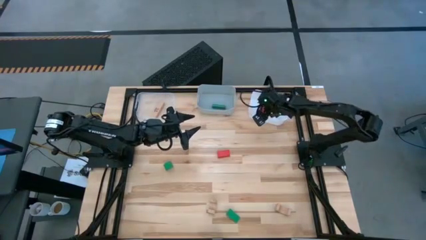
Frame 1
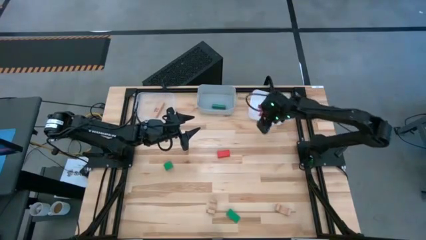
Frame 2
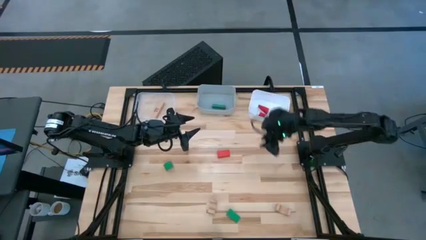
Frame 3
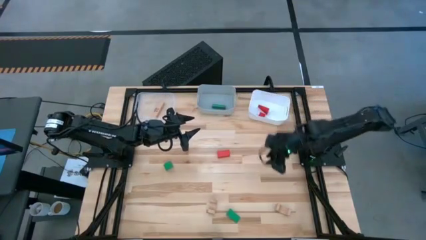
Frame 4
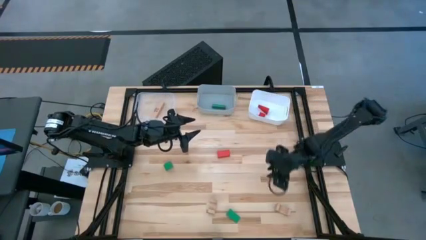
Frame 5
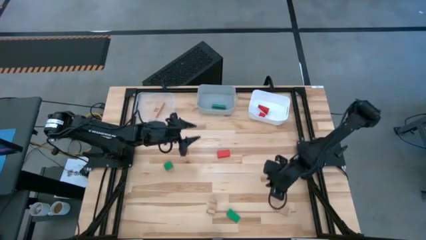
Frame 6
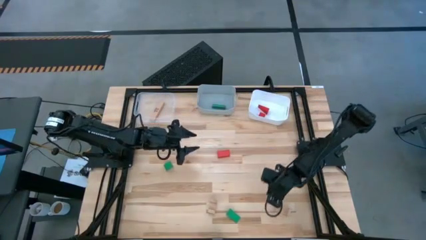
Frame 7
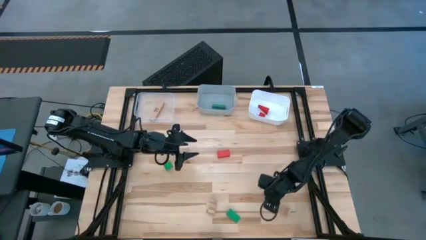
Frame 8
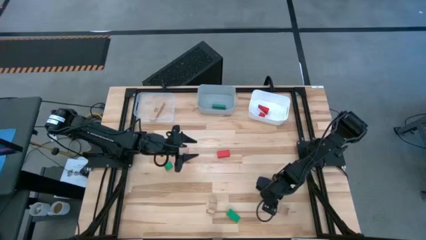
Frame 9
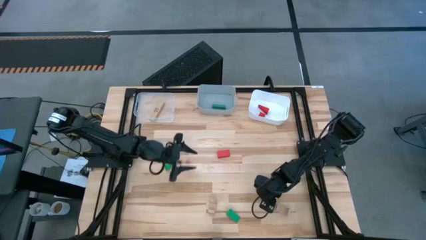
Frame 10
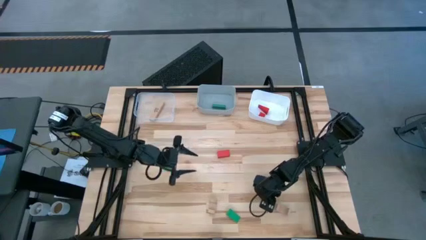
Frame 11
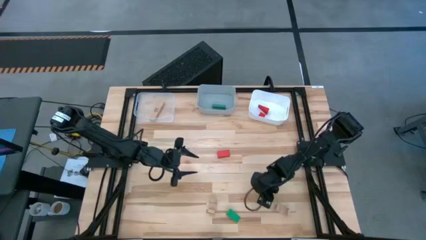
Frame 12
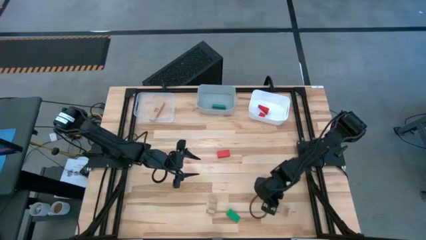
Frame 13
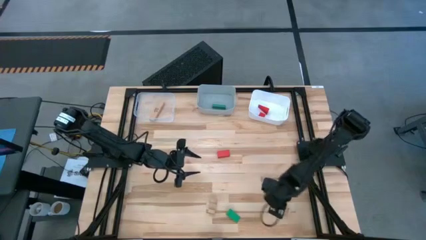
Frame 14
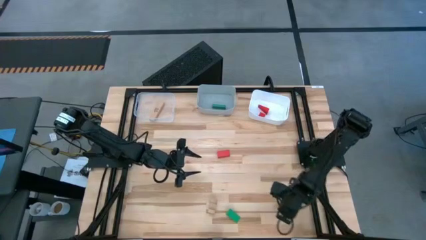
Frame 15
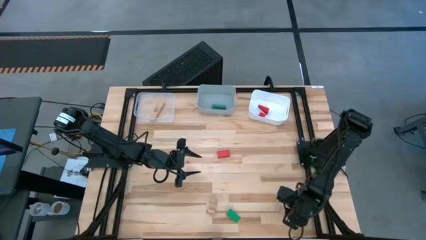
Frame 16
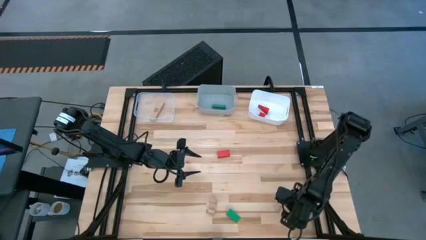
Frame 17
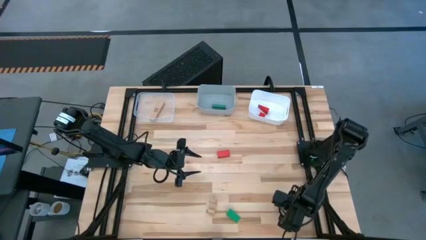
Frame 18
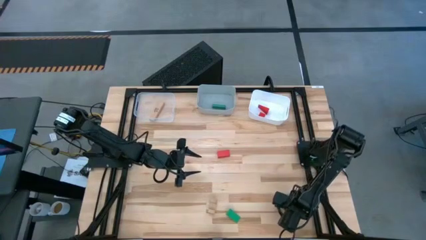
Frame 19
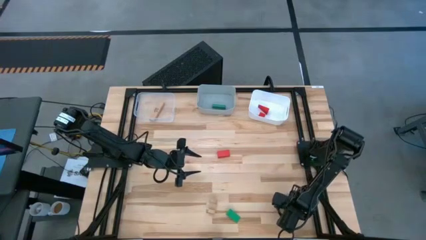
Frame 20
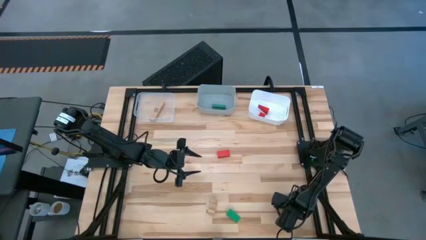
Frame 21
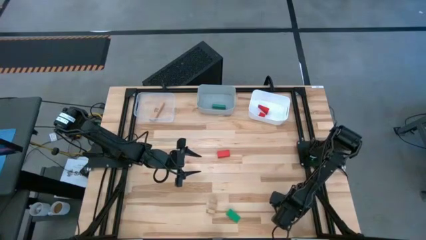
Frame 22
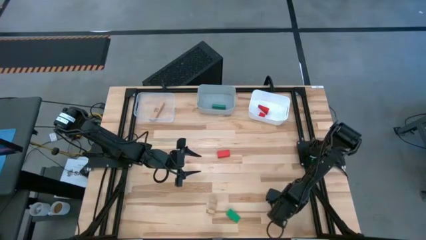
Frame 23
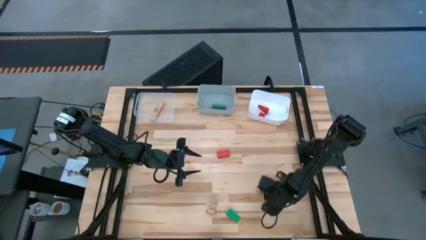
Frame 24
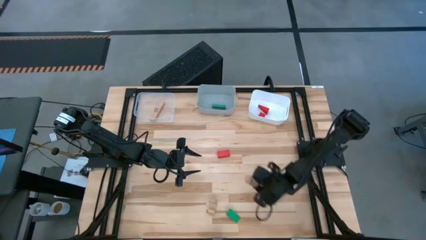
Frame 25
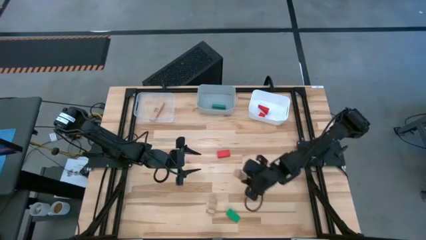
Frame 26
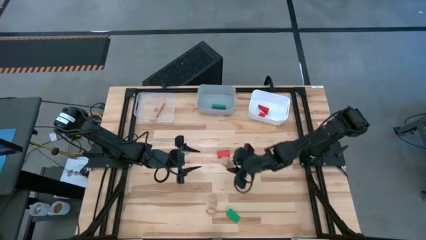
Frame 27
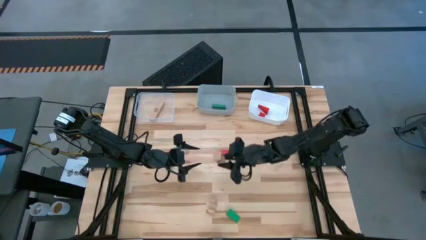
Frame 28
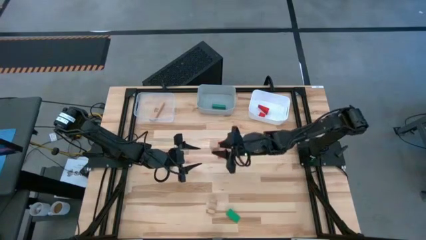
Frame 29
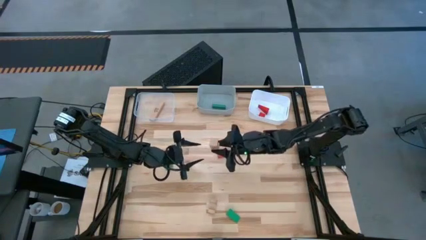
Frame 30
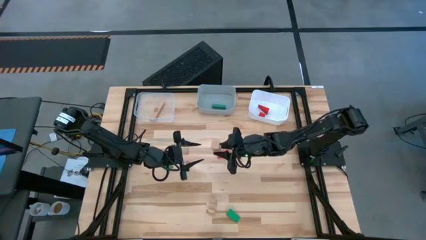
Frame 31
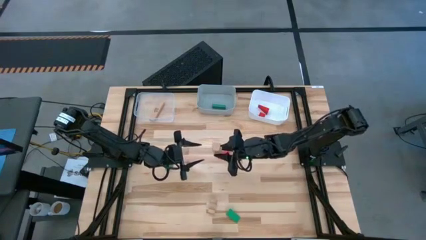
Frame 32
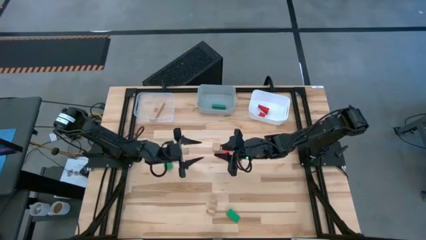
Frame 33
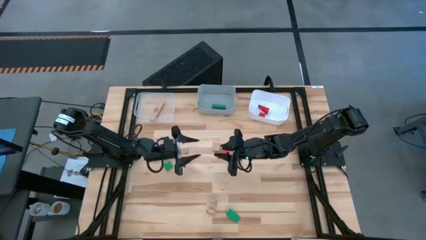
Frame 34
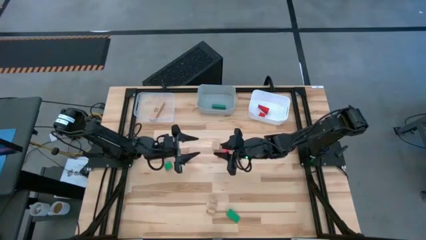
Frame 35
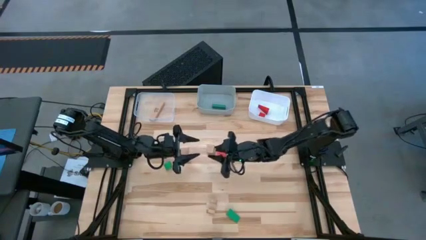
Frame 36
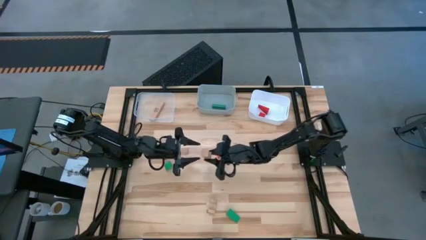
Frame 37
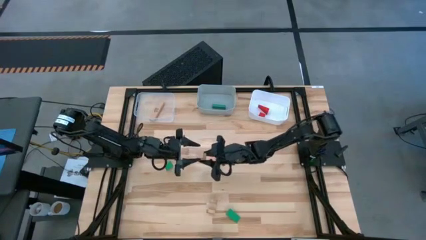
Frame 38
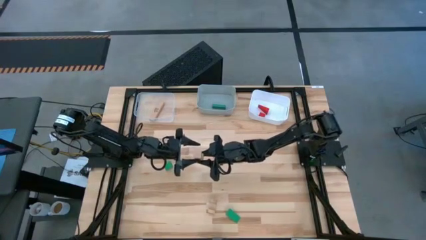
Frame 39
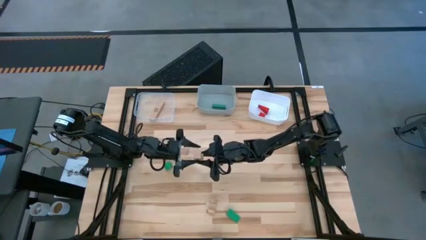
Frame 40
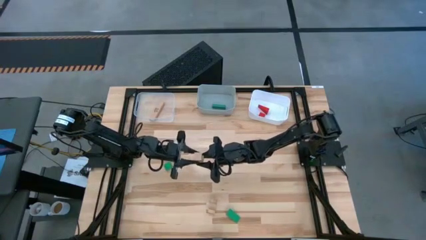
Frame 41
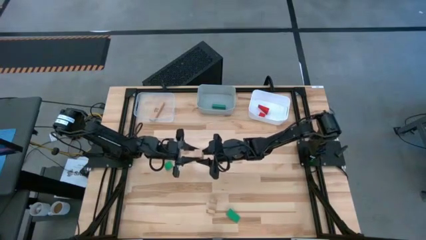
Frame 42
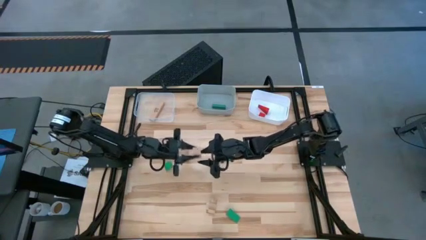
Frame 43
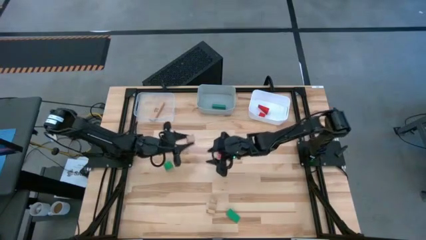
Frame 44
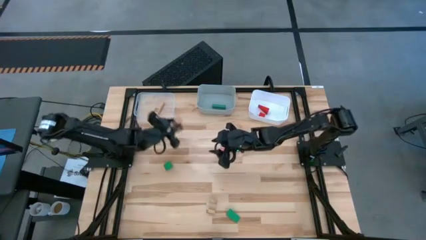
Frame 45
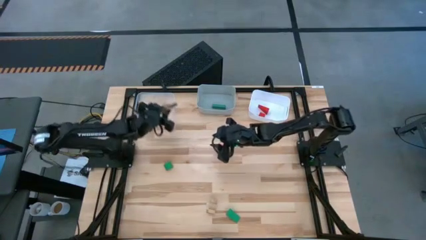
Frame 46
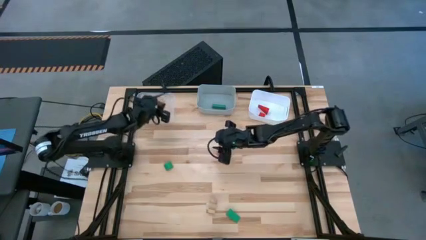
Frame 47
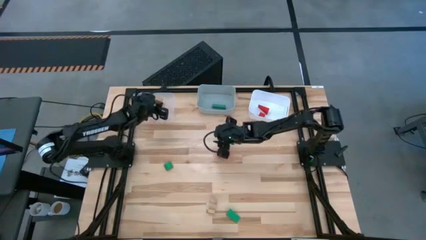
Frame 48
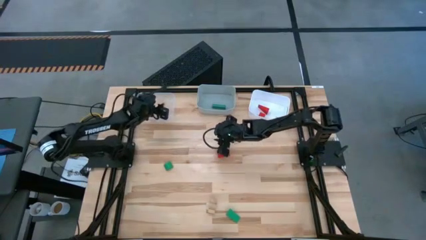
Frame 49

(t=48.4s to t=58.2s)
Task: Sort & place blocks by color
Put the right brown block into the transparent bin

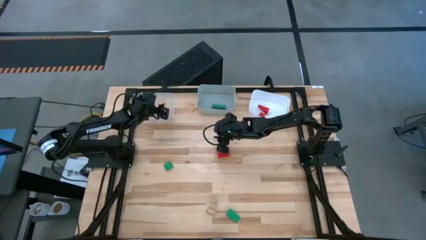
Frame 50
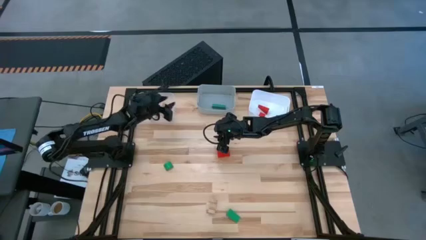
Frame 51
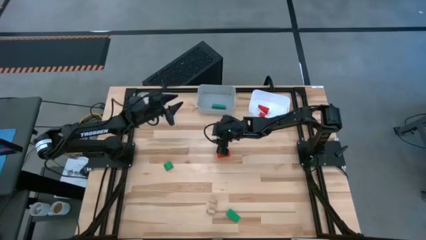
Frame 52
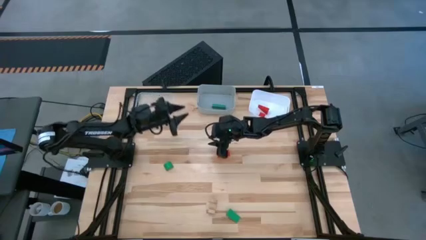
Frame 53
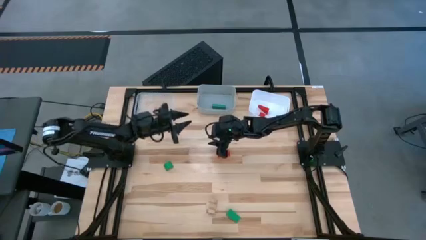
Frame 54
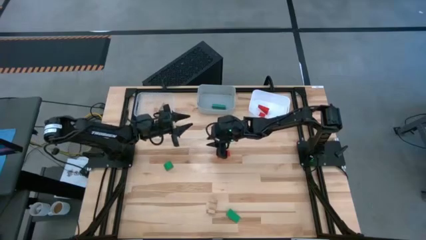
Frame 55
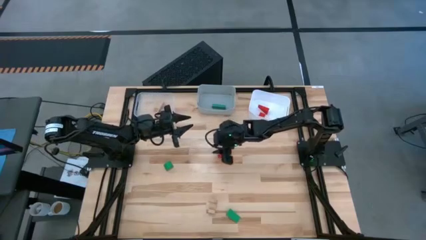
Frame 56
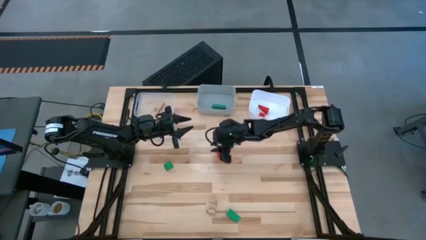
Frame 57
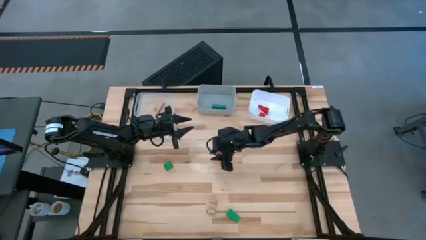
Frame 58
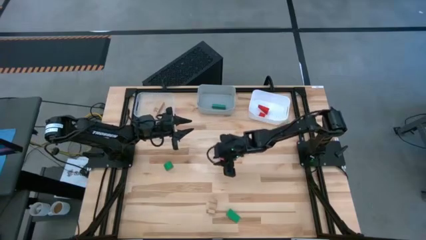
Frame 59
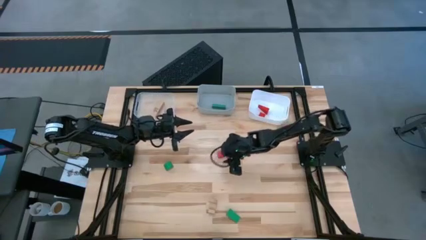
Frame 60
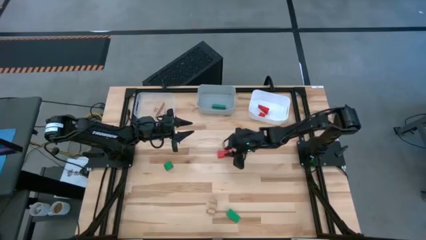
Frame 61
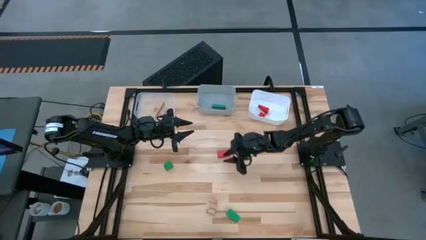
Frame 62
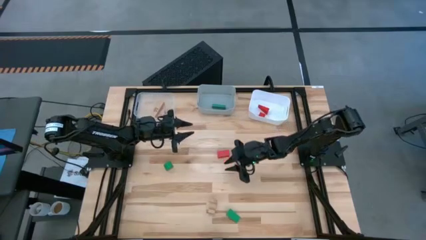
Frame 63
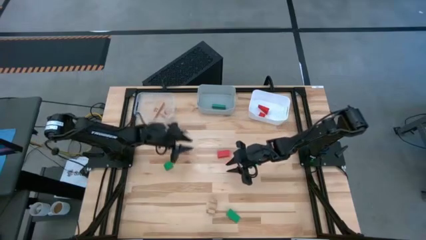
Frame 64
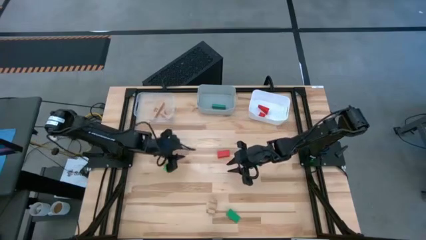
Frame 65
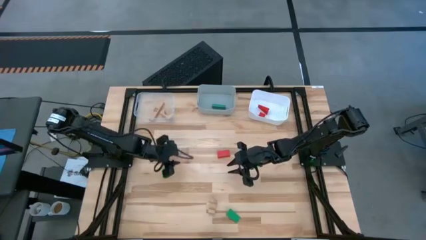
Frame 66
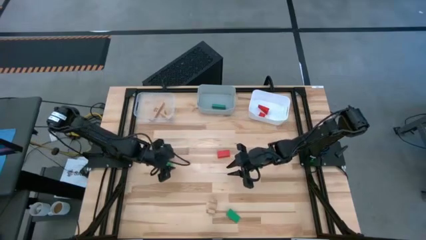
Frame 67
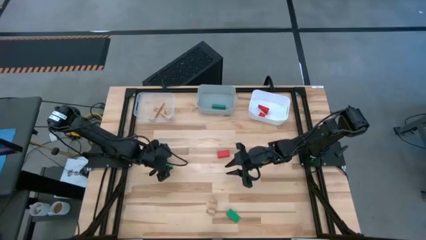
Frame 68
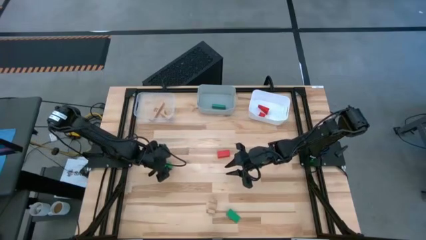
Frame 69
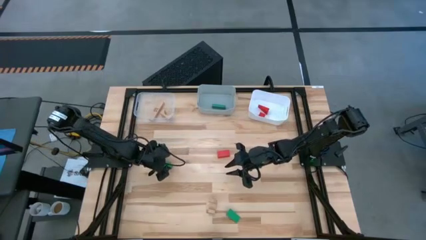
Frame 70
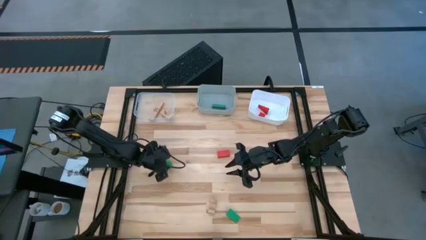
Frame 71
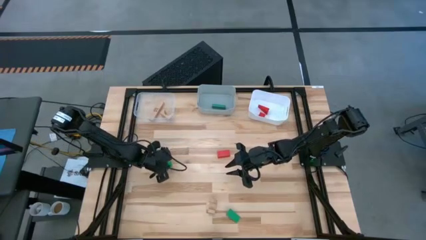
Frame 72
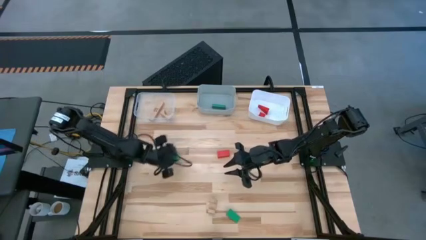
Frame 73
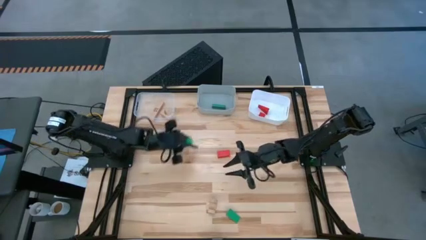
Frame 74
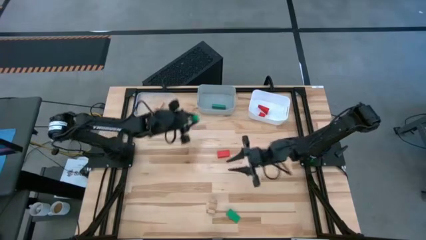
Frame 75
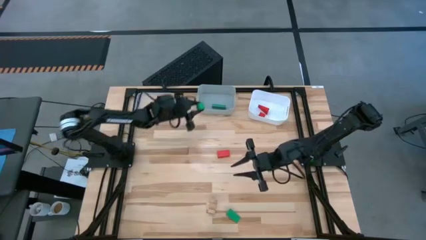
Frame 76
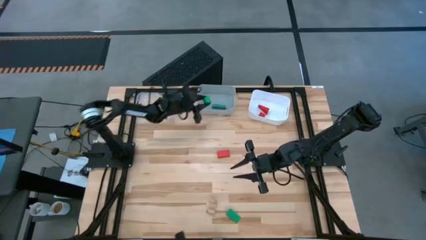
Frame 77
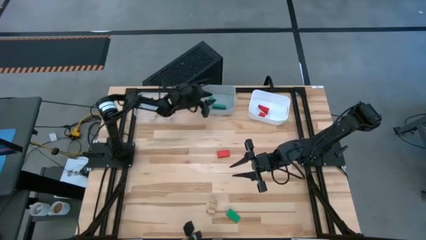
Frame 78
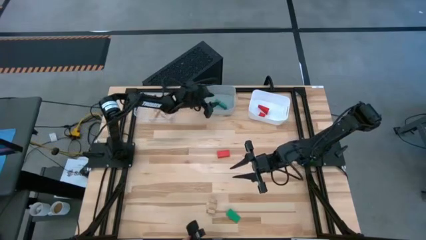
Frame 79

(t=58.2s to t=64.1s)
Put the top green block into the gray bin

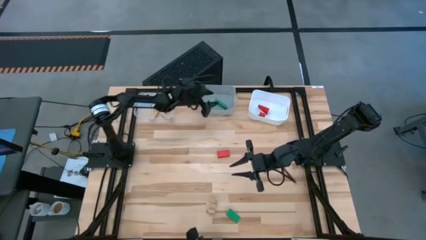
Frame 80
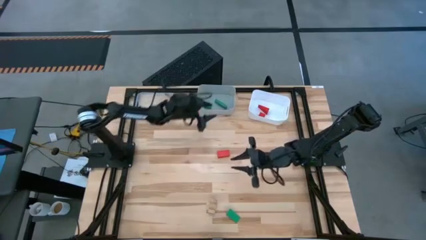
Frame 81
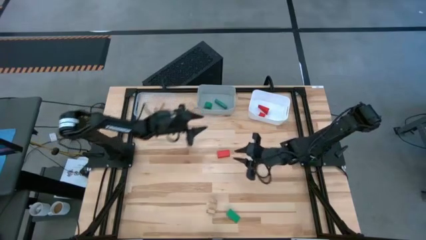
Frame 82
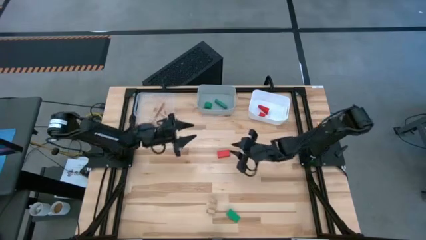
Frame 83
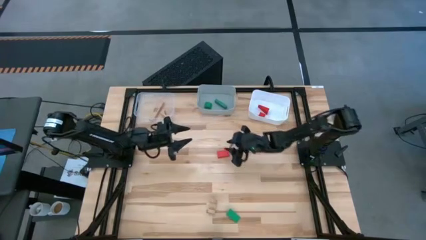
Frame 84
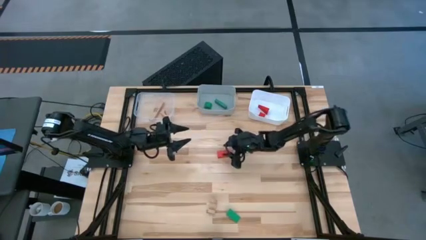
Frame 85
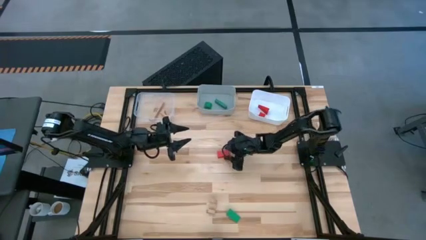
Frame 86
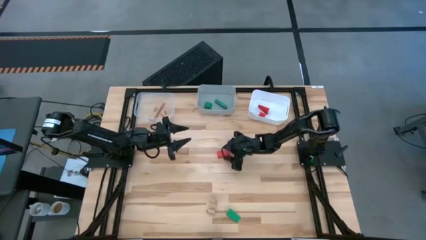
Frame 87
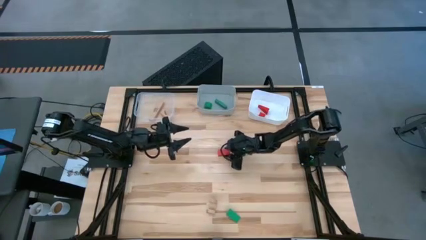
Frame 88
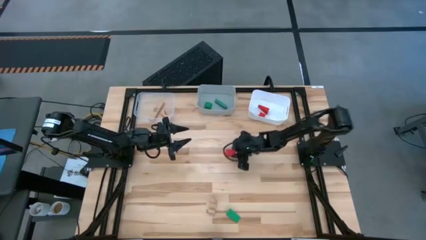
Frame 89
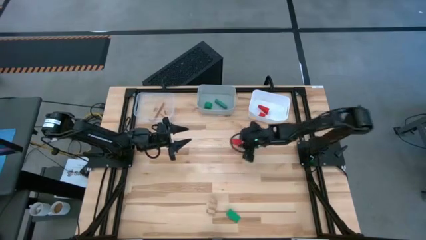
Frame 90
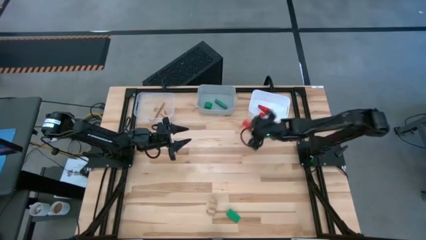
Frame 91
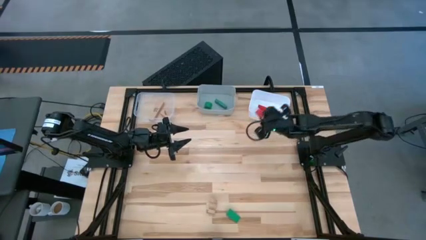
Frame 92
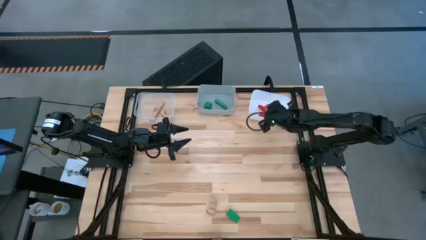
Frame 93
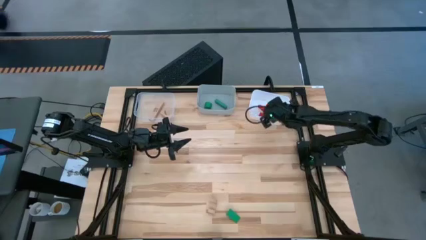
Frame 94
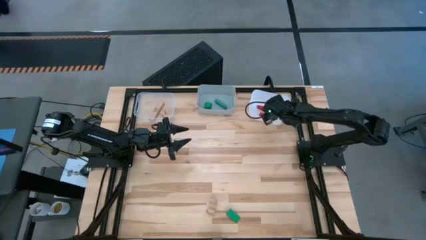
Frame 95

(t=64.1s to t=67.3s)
Put the red block into the white bin
